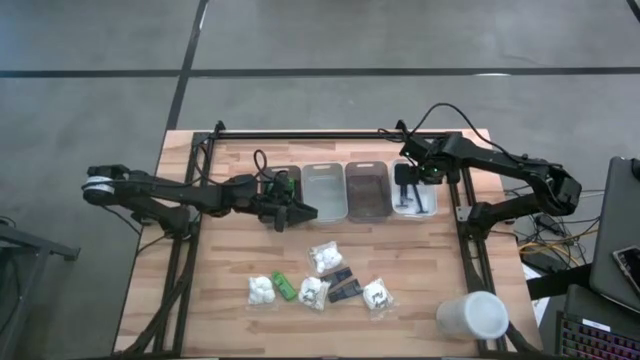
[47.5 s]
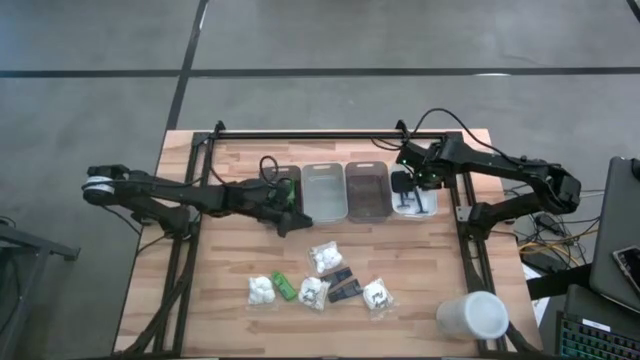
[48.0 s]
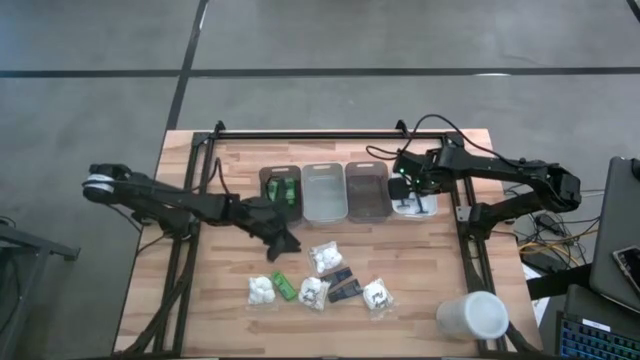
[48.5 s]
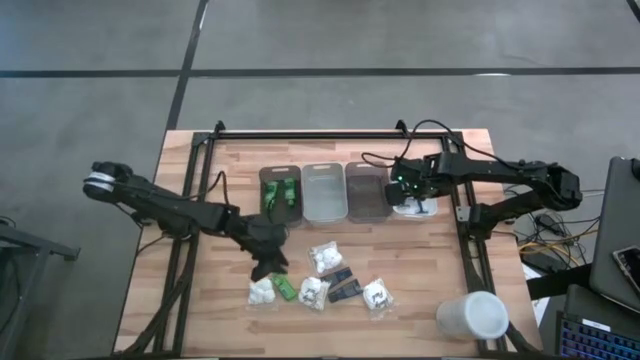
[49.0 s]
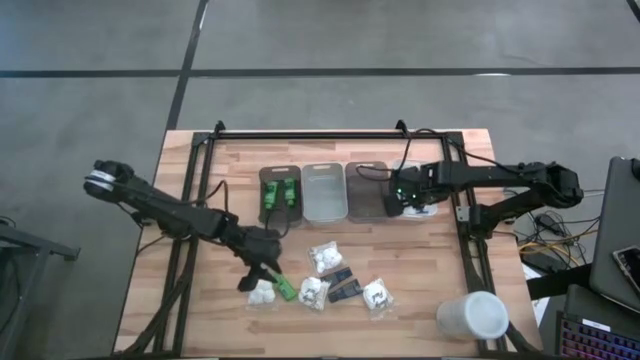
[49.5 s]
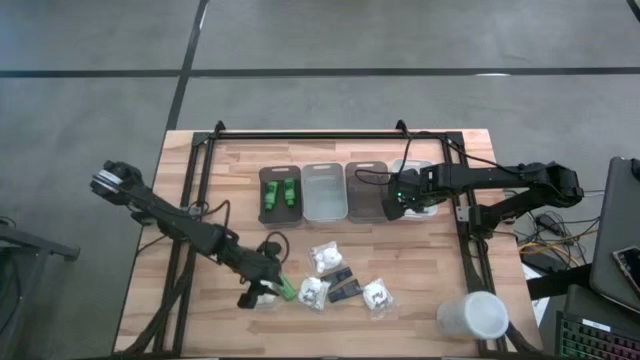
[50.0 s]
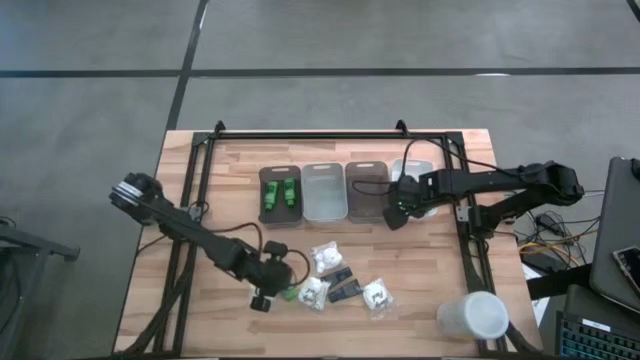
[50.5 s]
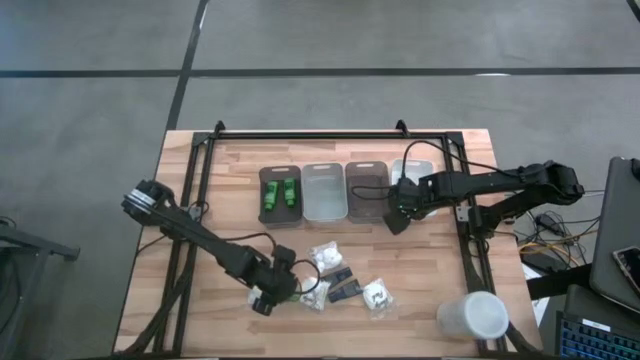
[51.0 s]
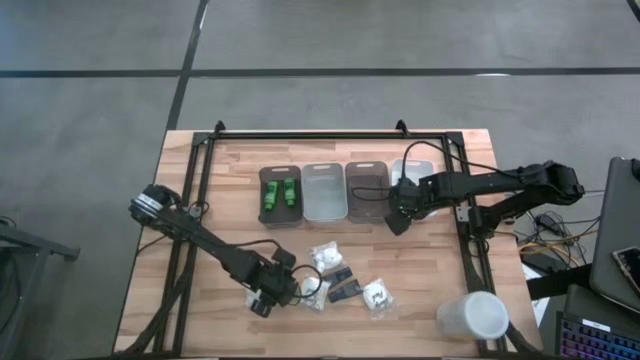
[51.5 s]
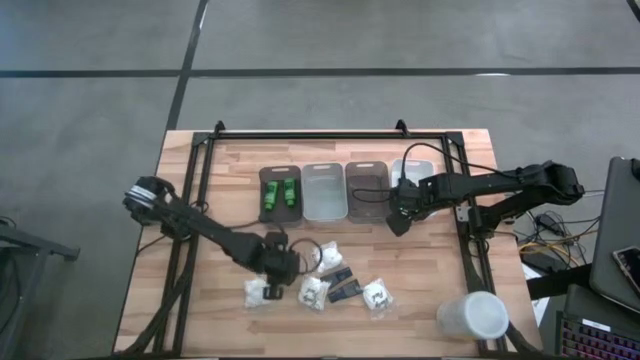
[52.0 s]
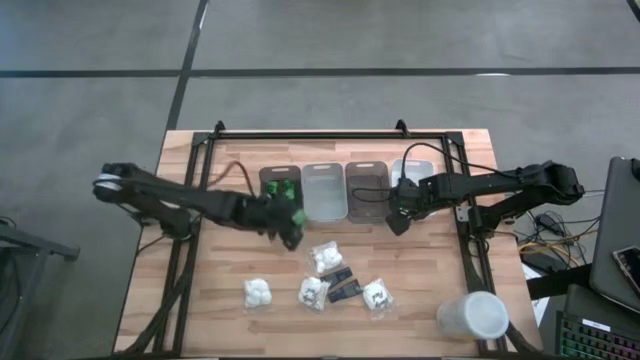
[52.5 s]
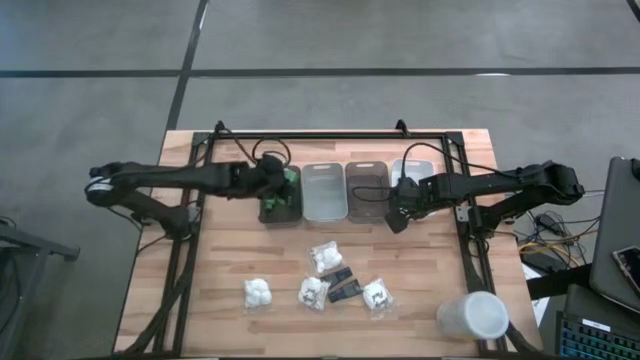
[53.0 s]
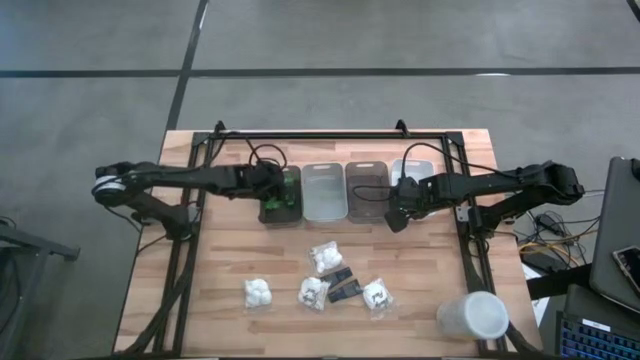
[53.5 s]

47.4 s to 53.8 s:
Task: Pick & Place Travel size toiletries
Put the shampoo into the left black bin

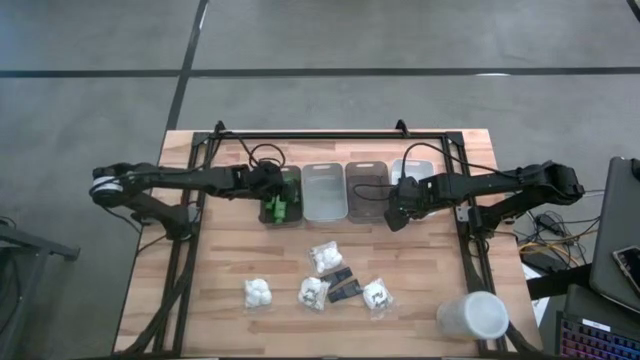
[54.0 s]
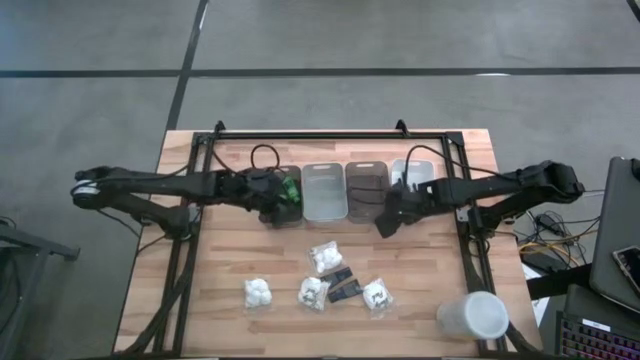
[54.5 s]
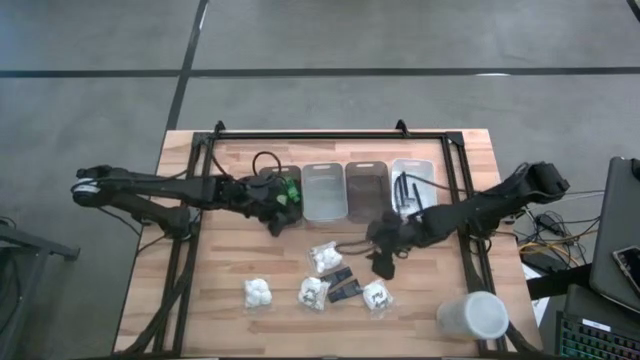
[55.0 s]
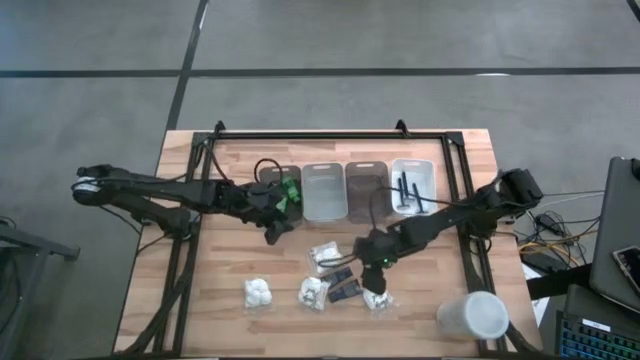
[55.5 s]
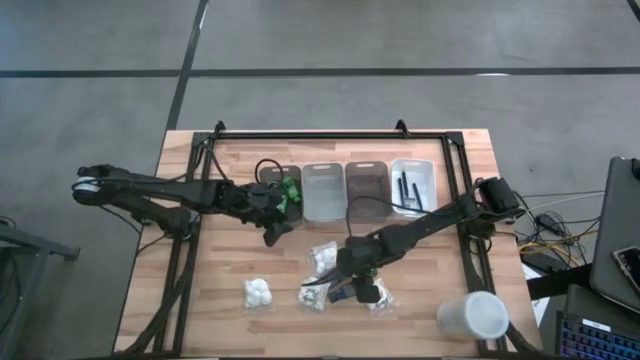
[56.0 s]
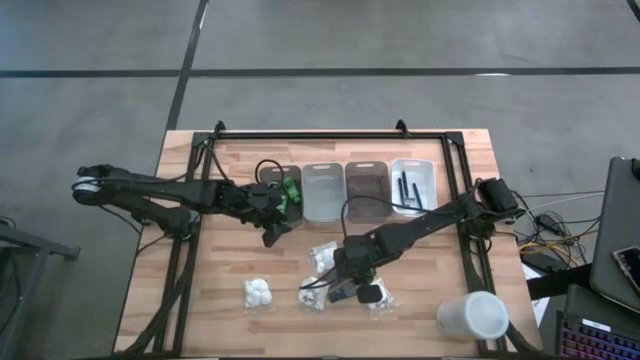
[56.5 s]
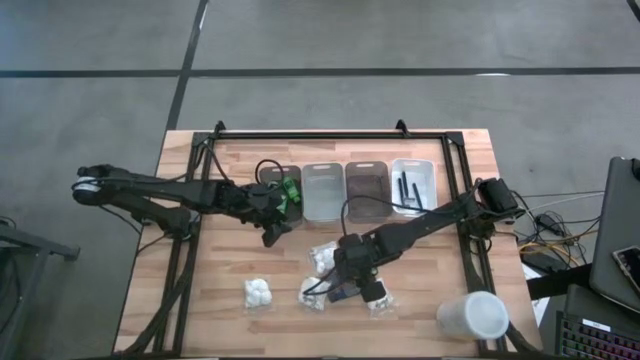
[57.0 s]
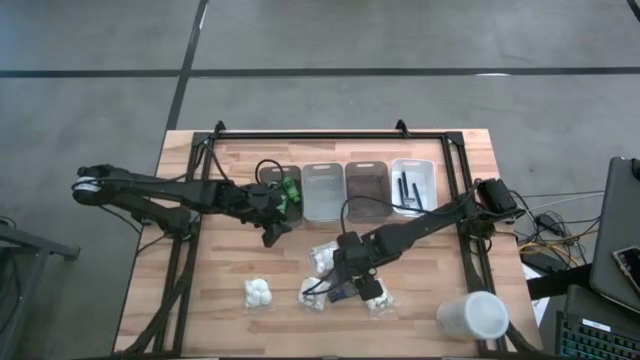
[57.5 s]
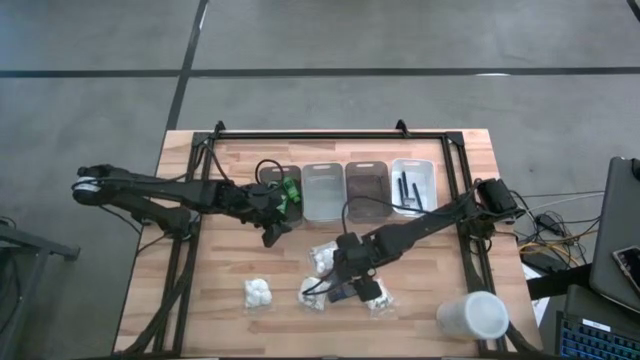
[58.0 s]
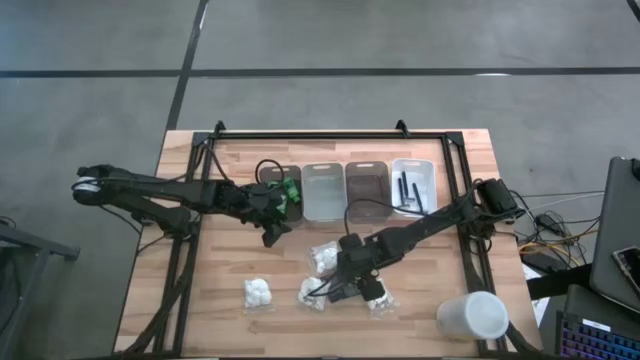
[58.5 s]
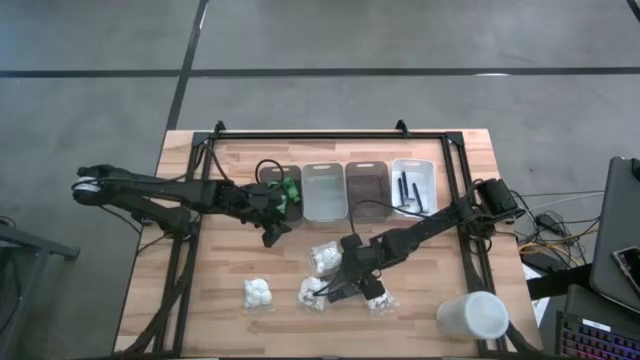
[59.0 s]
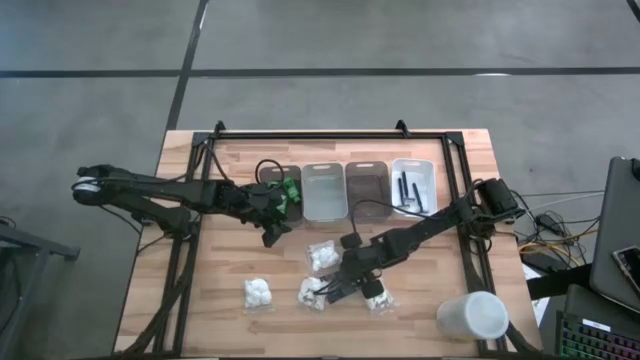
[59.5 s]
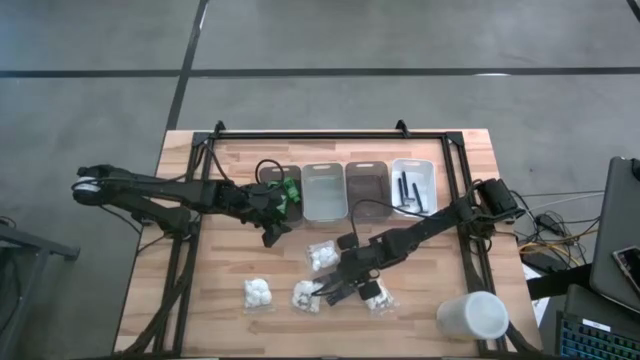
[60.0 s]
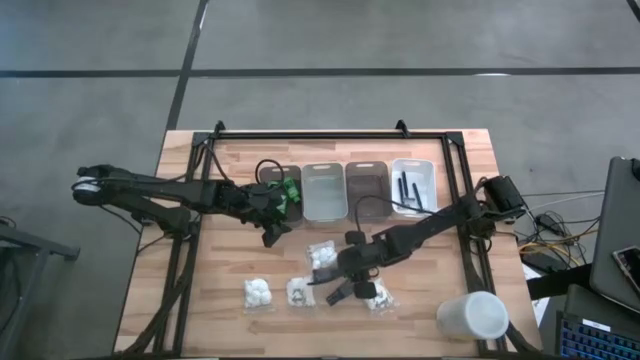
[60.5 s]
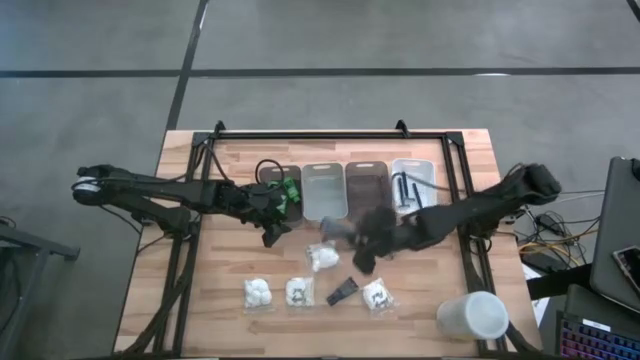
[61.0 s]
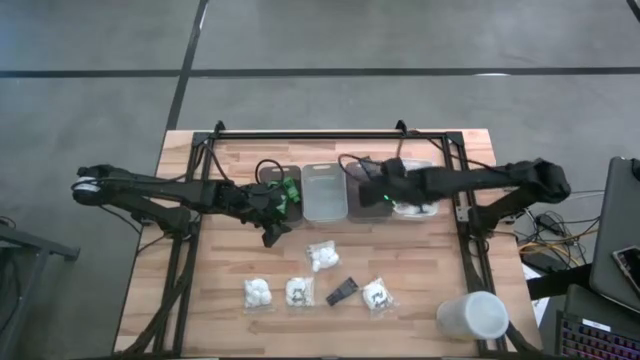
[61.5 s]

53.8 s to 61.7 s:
Put the top shave cream into the right black bin

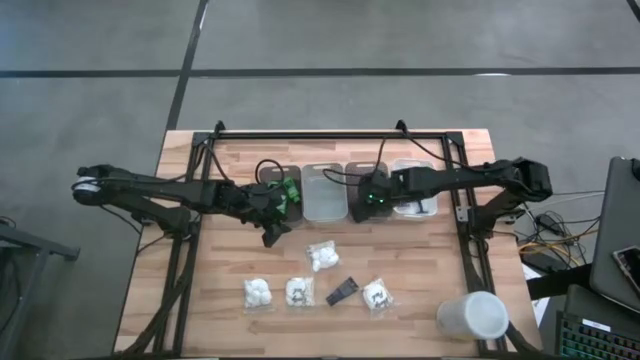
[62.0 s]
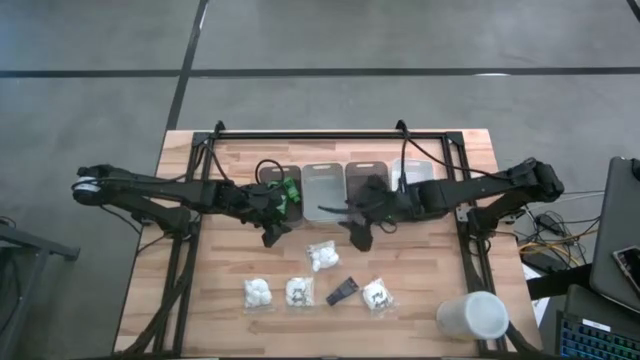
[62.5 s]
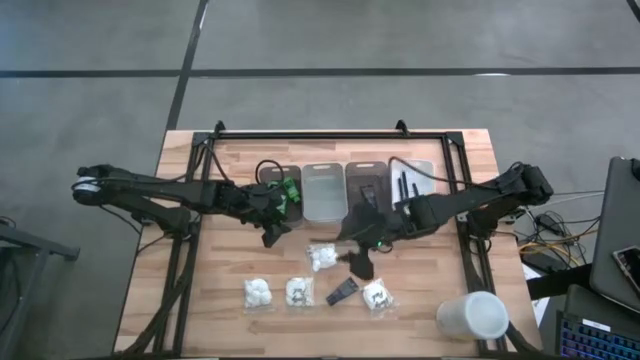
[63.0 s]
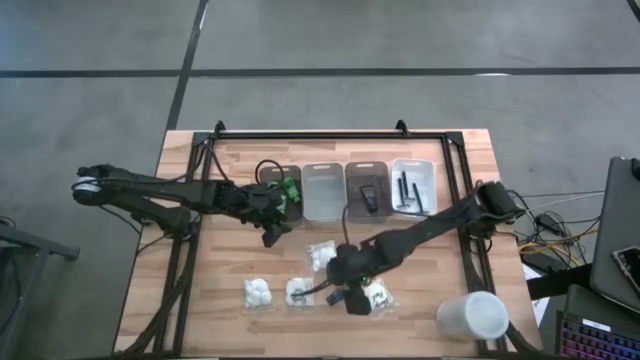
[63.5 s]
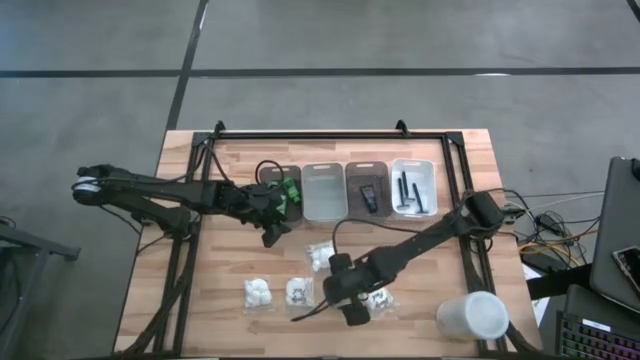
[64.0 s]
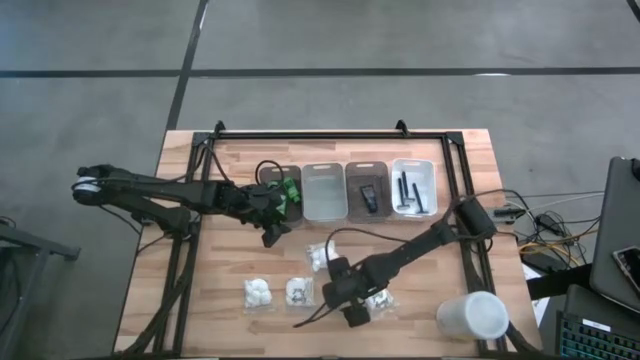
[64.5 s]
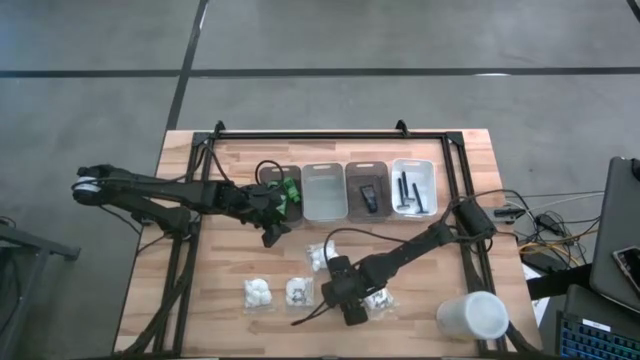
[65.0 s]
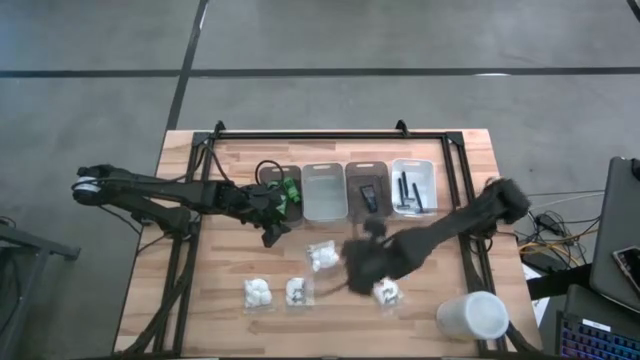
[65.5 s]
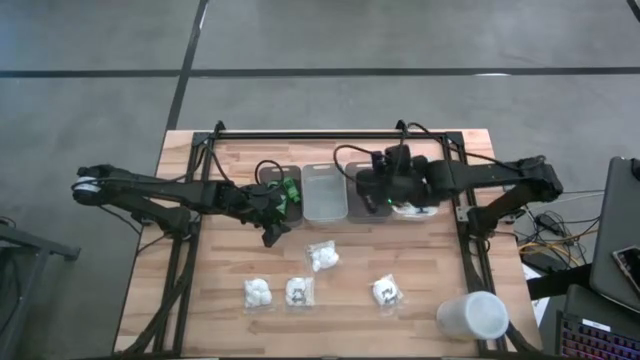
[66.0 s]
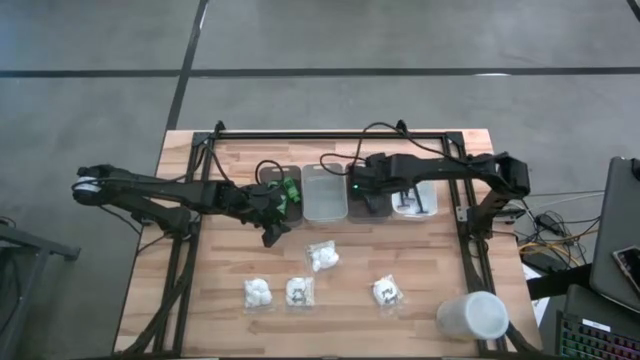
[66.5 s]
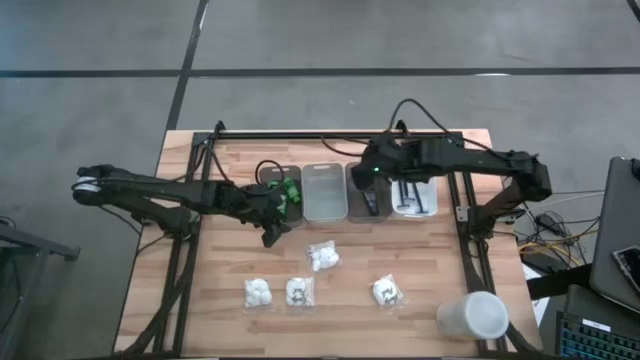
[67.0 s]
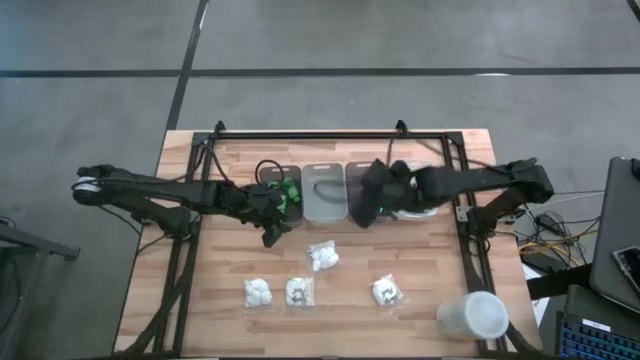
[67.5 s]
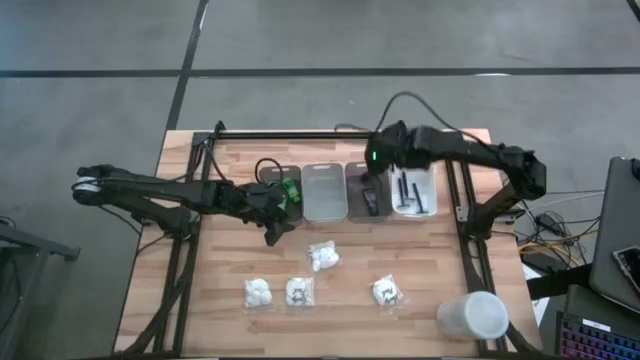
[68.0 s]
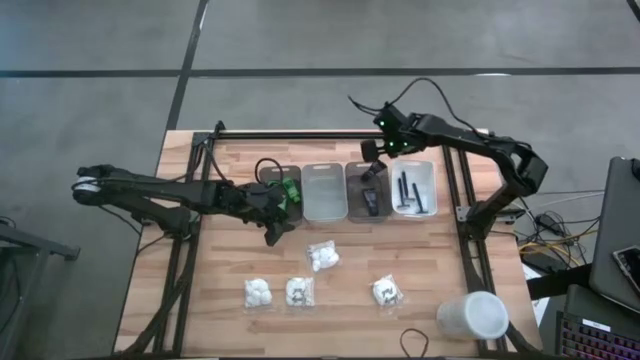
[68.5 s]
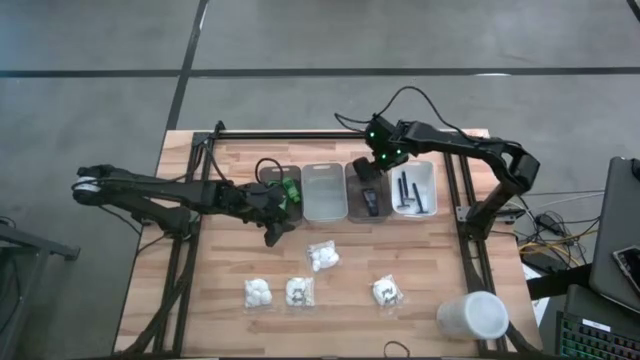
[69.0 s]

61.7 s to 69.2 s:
Put the shave cream into the right black bin
